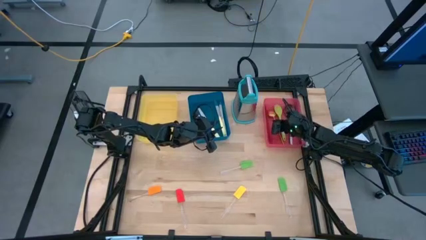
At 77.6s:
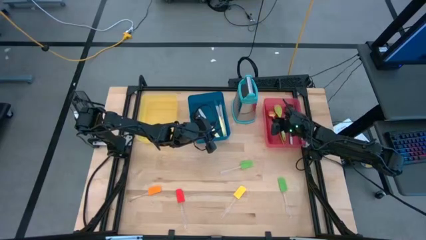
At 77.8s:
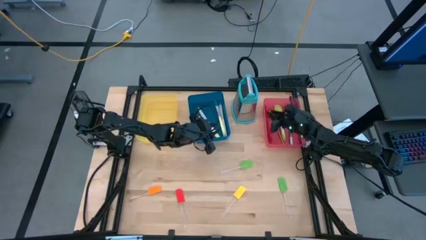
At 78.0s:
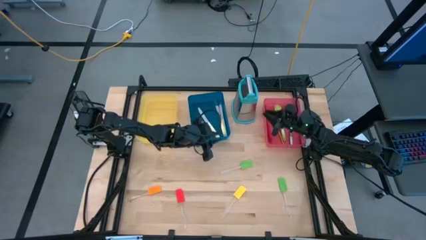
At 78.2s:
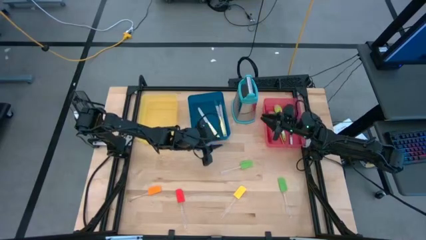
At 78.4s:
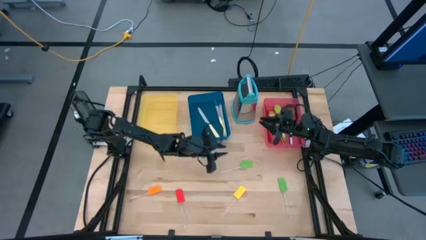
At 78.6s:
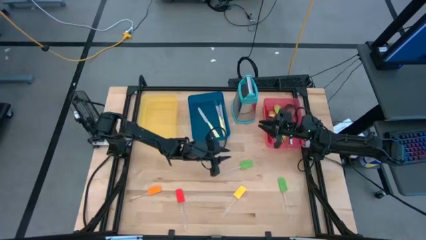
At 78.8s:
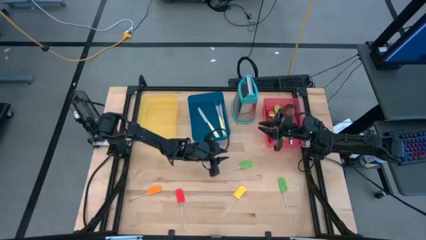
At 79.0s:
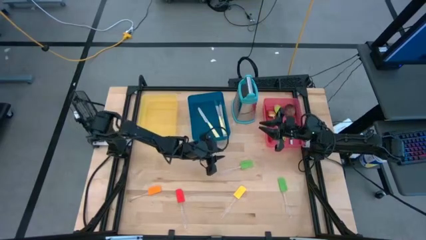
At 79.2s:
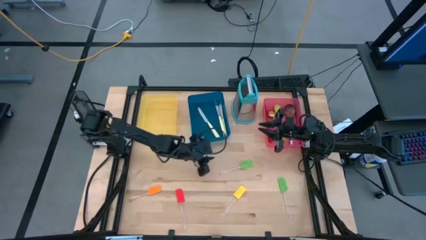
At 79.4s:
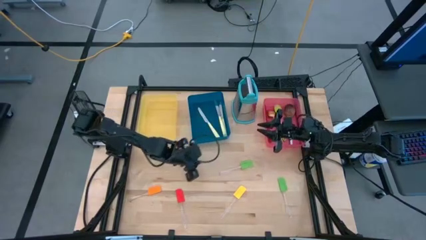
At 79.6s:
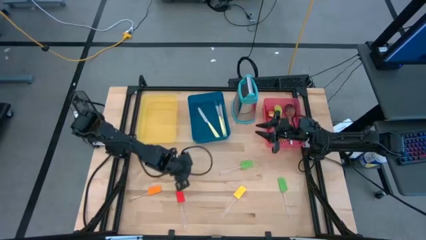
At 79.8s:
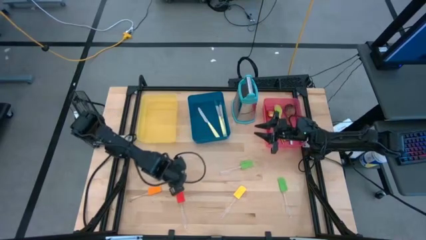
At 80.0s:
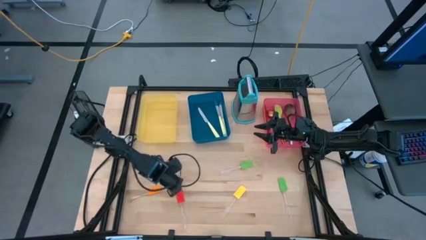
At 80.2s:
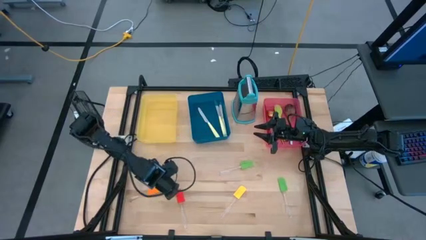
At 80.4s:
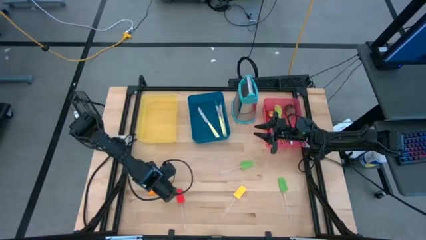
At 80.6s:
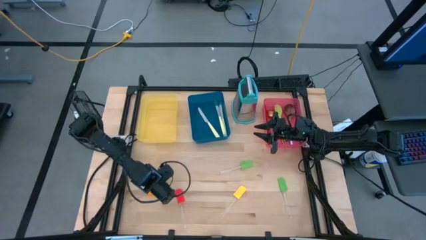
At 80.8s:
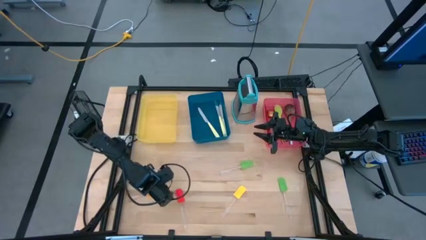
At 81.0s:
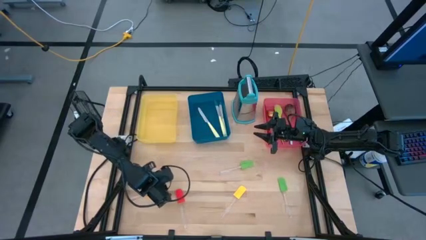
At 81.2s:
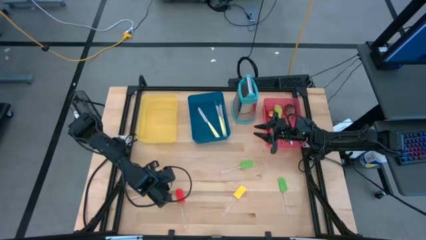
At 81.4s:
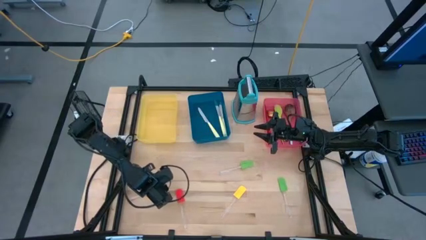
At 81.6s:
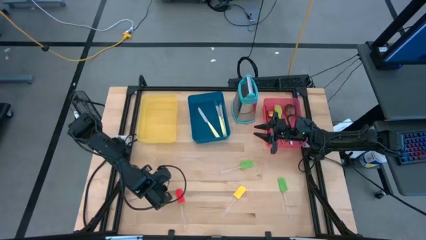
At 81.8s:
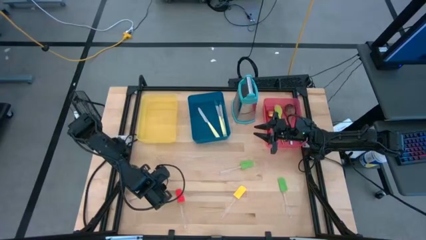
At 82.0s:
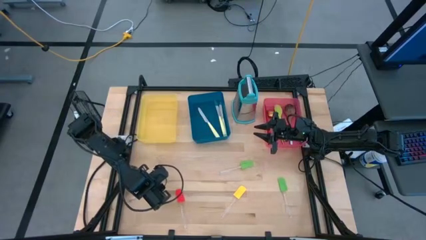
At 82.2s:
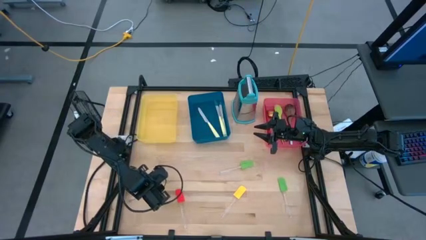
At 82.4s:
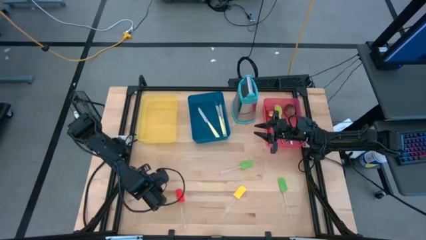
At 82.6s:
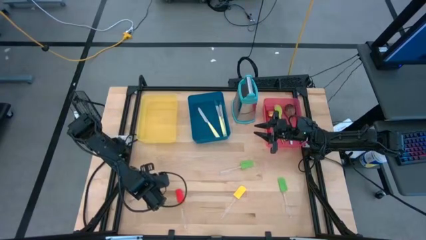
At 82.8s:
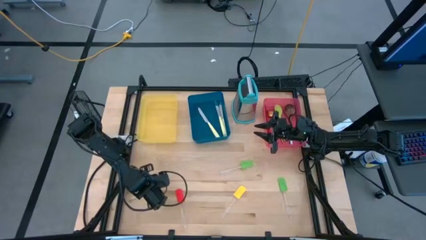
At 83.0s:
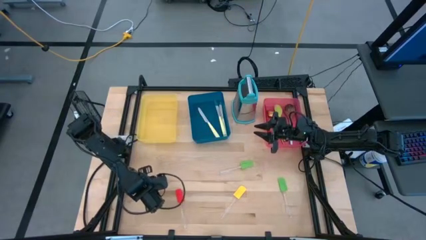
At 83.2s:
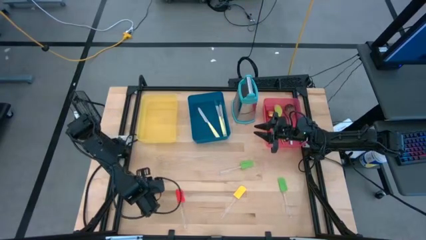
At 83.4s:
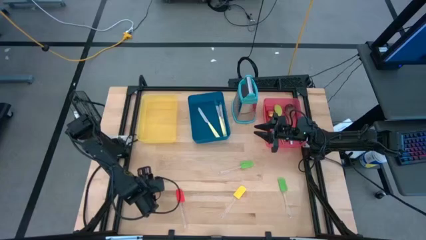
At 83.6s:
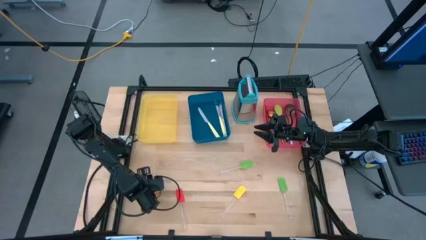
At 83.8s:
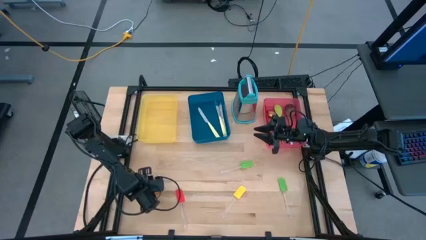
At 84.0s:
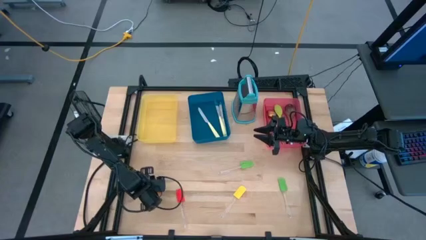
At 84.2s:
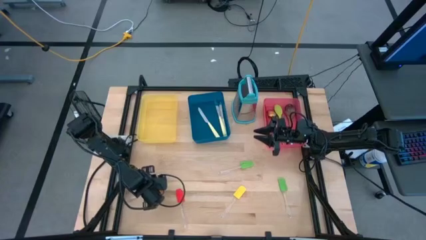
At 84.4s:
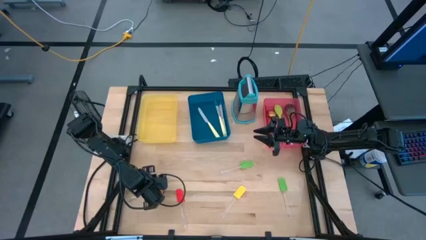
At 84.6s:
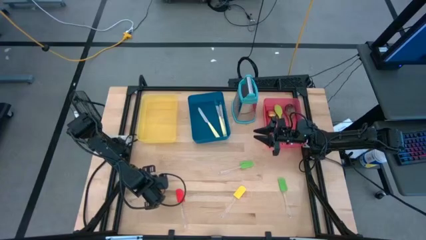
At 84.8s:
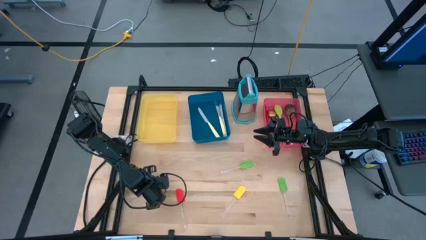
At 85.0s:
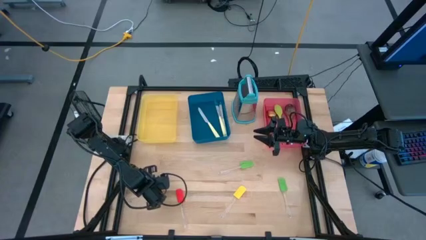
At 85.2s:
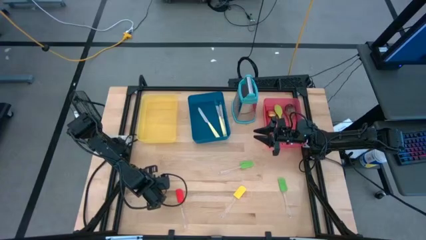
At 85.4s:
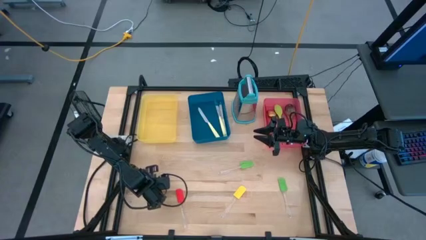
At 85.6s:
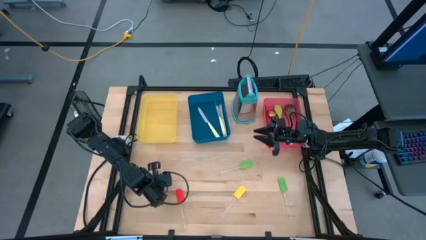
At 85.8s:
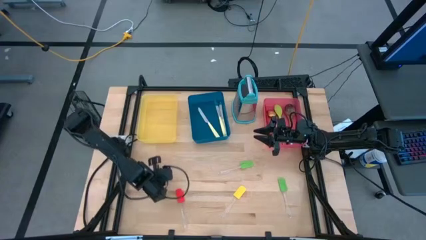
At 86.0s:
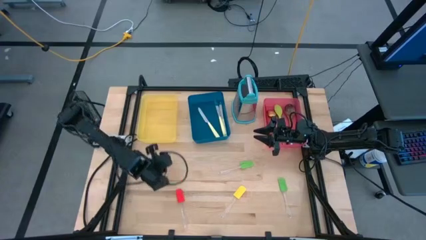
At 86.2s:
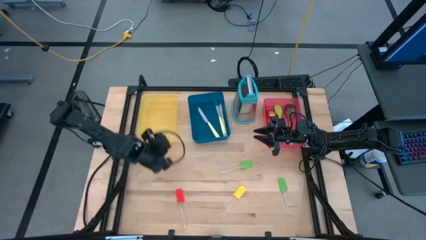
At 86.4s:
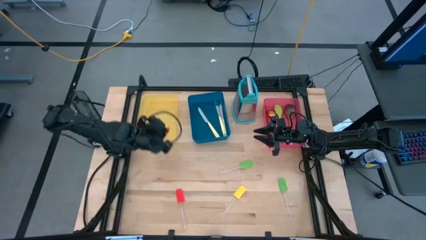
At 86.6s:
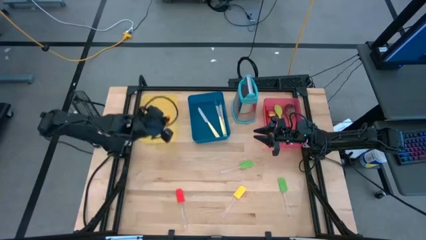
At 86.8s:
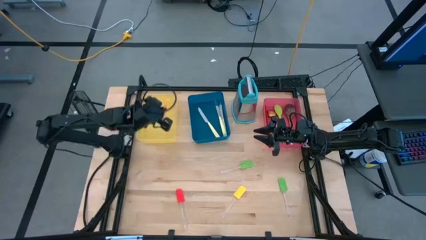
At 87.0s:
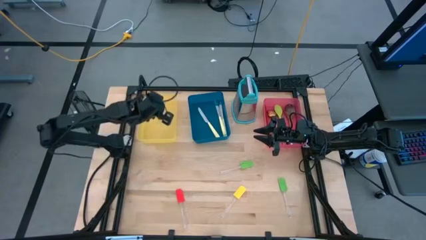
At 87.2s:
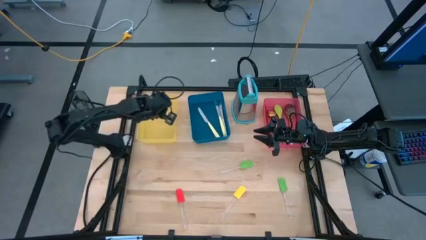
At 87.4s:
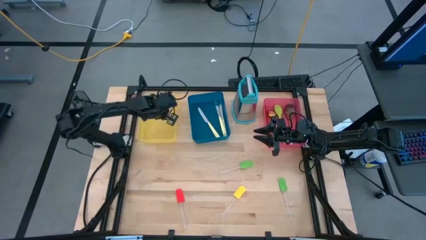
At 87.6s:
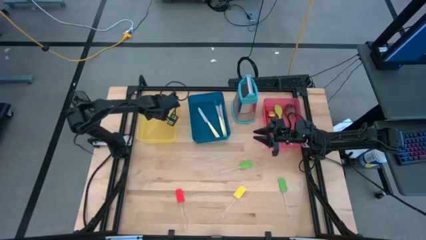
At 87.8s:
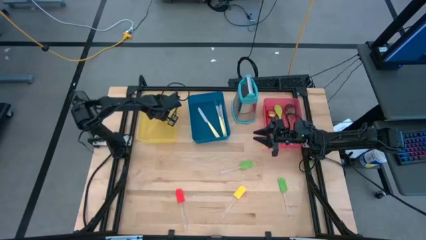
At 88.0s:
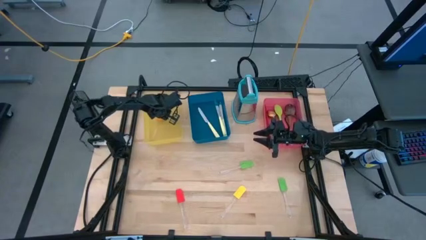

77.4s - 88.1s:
Task: Pick & Place Kitchen Items
Put the orange spatula into the yellow bin

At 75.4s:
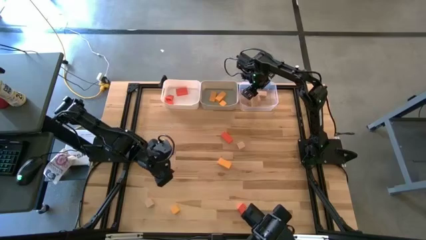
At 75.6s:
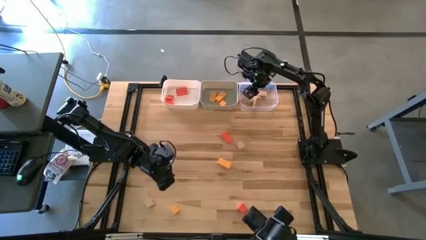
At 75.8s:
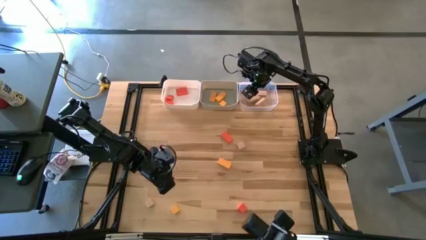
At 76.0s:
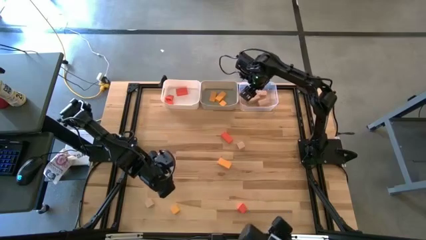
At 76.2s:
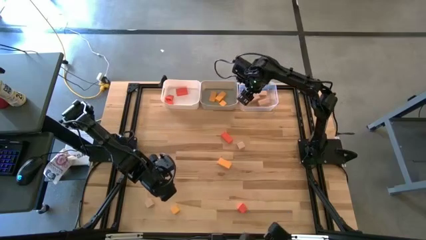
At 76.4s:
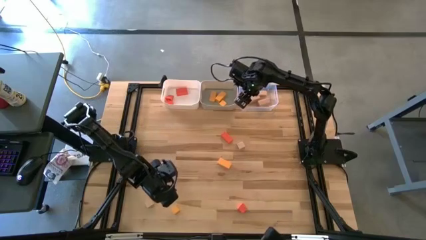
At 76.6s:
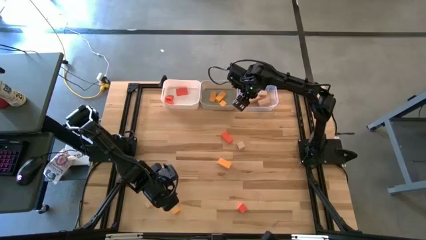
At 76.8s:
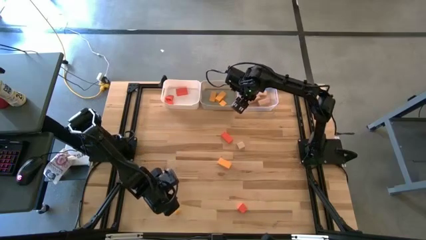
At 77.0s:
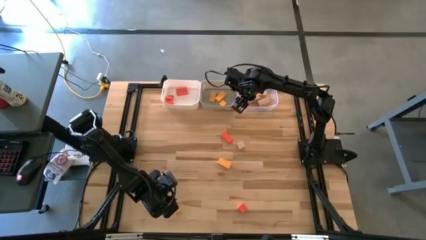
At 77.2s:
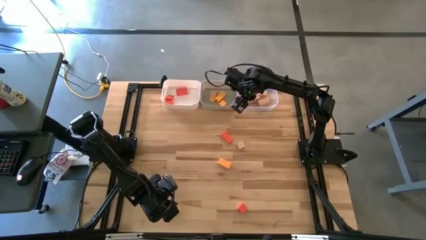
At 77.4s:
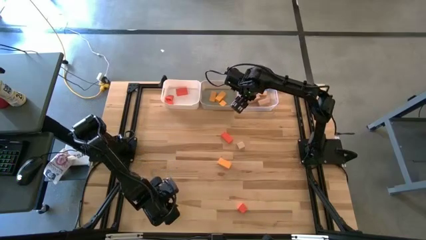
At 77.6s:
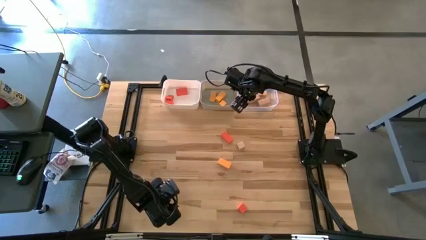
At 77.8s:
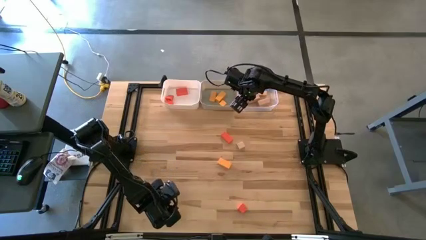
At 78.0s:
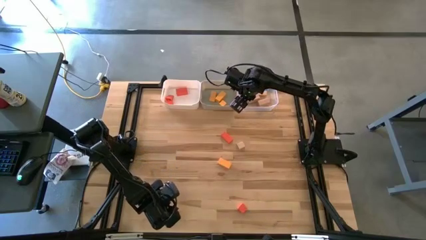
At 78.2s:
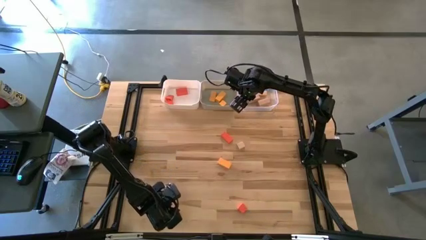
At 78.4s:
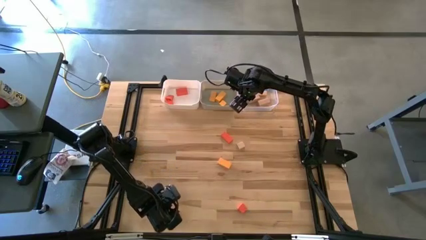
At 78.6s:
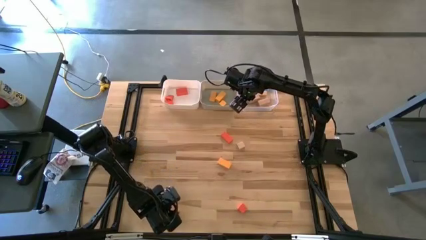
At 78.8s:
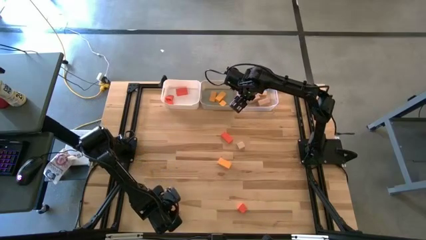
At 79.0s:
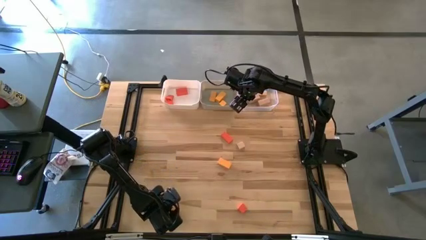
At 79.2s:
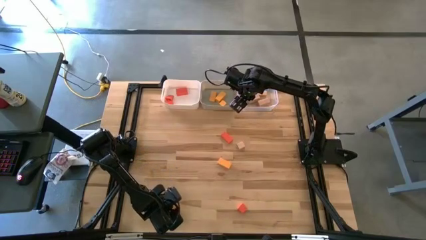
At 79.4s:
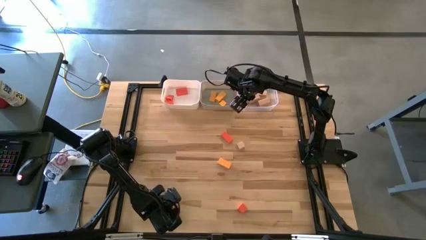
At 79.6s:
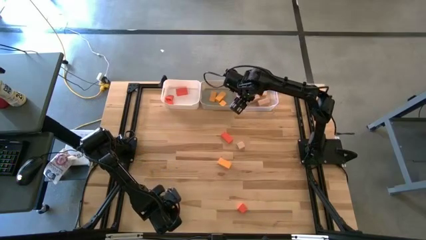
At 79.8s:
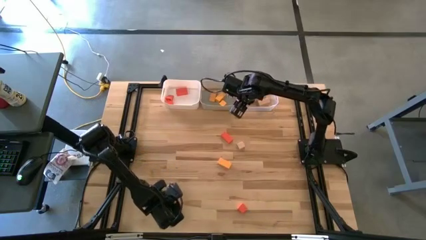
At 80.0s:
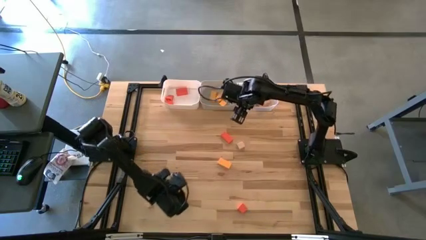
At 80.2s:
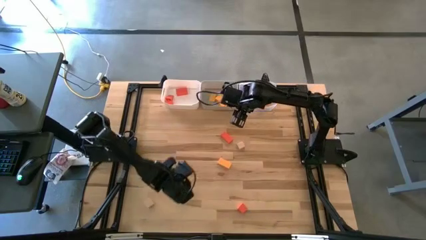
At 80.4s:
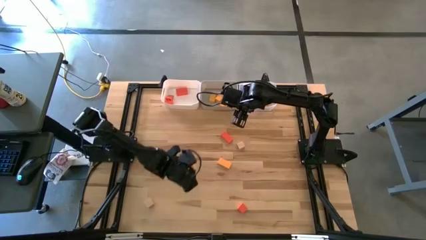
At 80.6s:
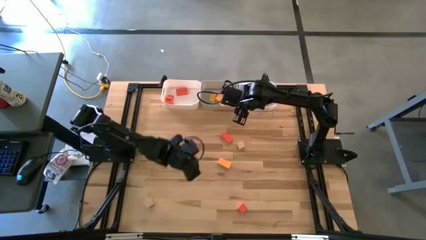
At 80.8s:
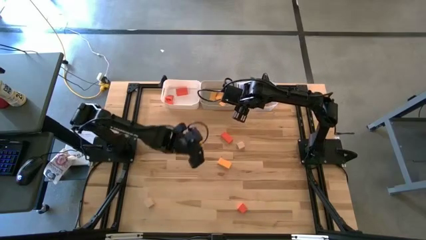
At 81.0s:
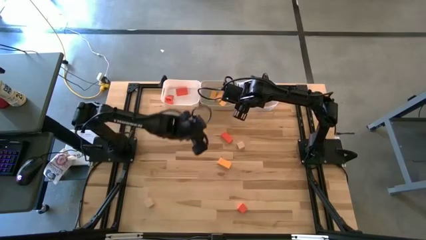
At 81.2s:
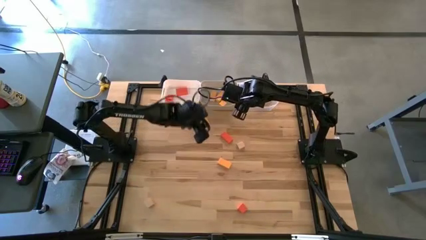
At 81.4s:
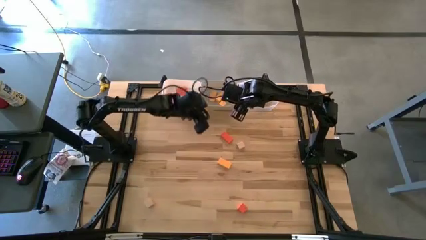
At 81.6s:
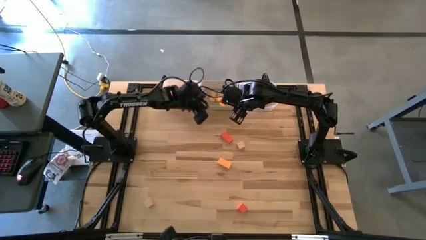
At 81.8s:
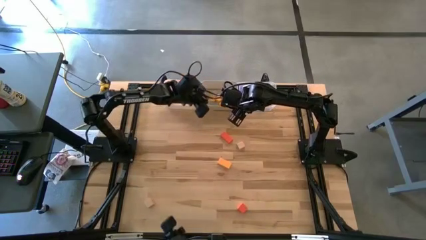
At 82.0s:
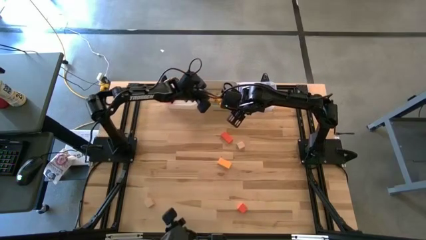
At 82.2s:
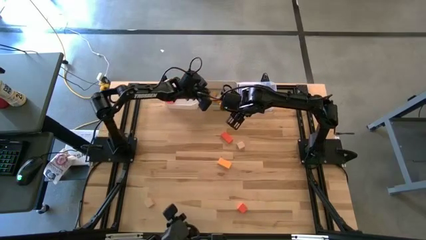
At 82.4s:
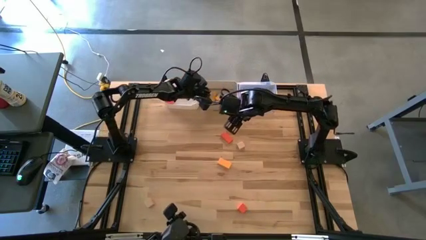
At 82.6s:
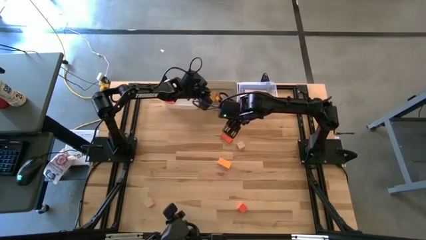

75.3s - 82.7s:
Task: Sort & place blocks by color
Put the yellow block into the gray bin
